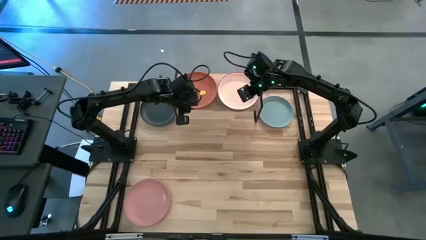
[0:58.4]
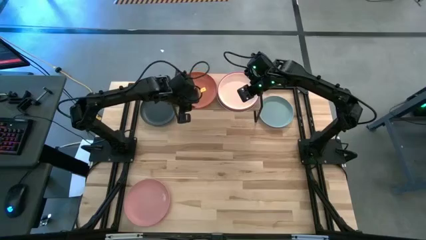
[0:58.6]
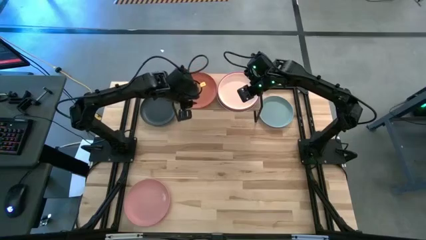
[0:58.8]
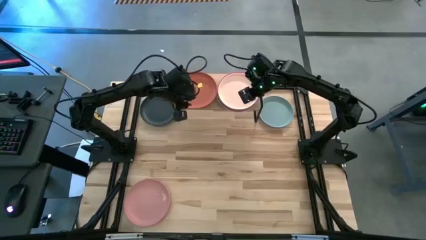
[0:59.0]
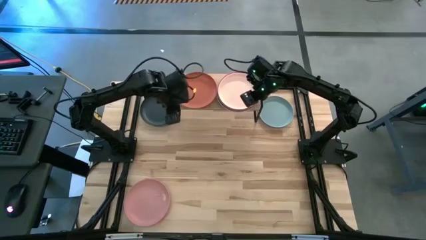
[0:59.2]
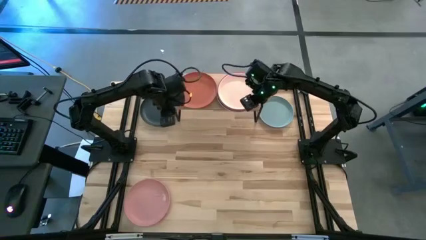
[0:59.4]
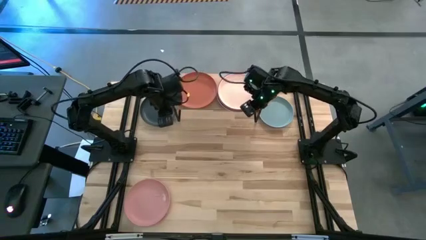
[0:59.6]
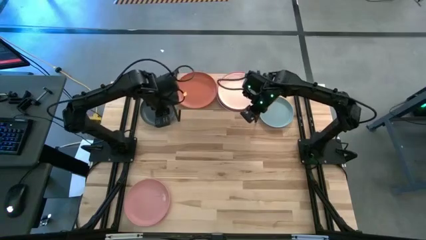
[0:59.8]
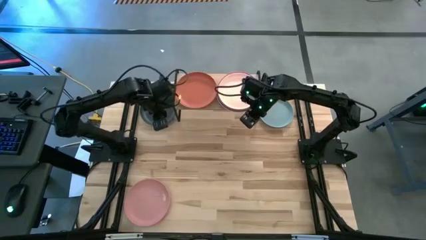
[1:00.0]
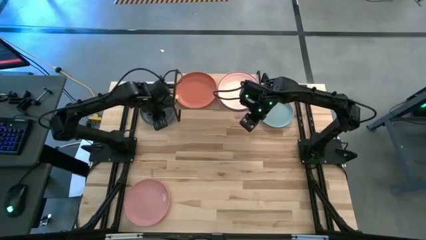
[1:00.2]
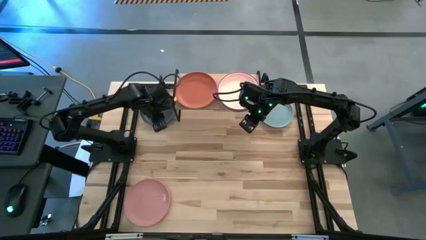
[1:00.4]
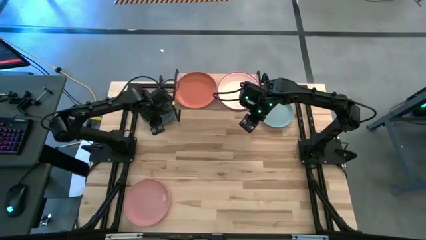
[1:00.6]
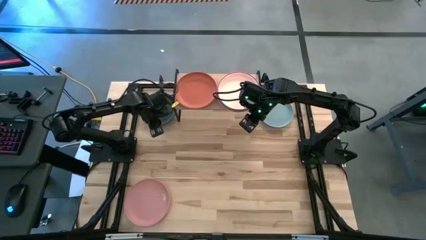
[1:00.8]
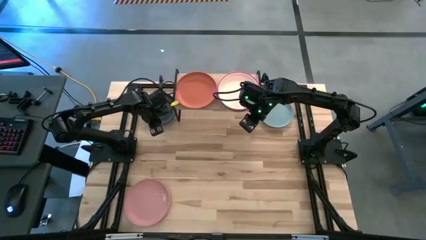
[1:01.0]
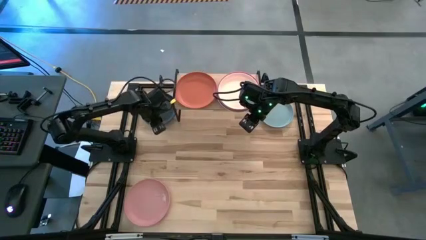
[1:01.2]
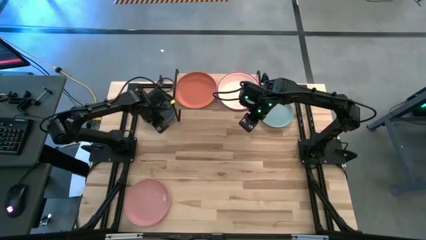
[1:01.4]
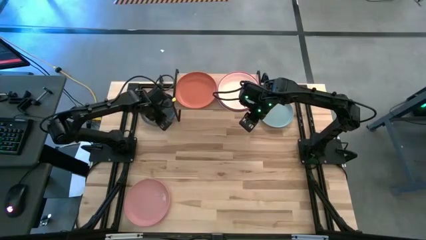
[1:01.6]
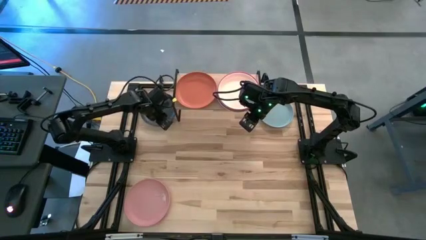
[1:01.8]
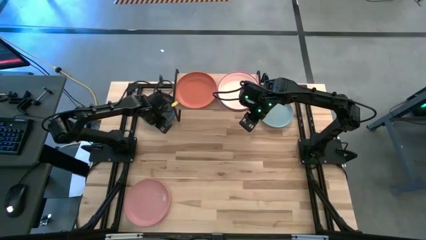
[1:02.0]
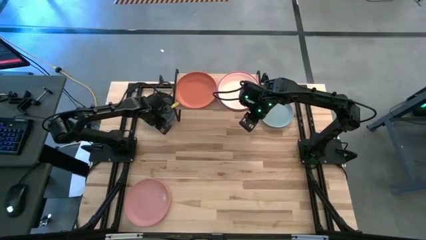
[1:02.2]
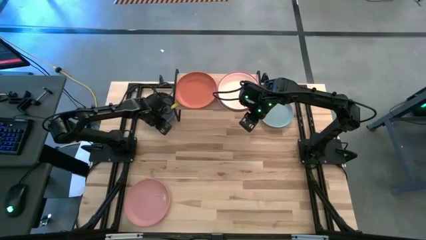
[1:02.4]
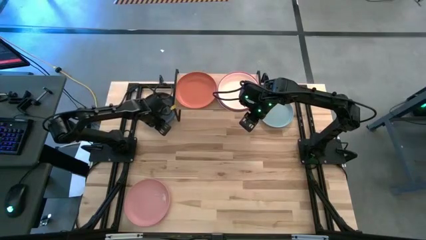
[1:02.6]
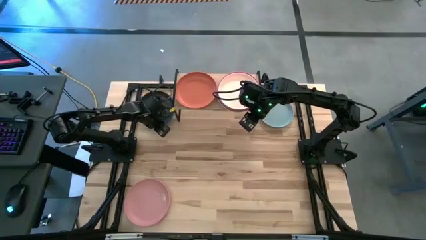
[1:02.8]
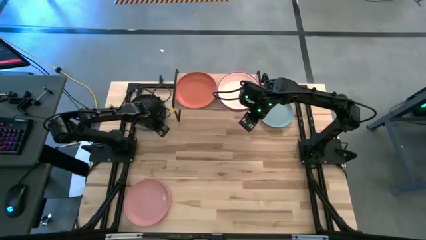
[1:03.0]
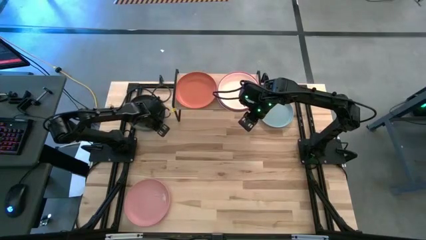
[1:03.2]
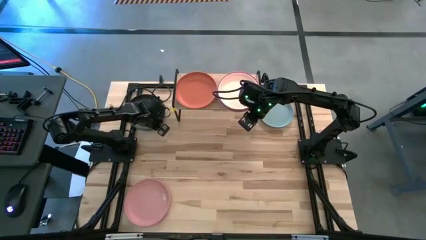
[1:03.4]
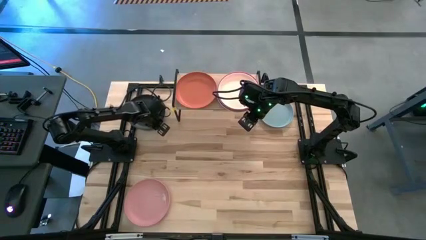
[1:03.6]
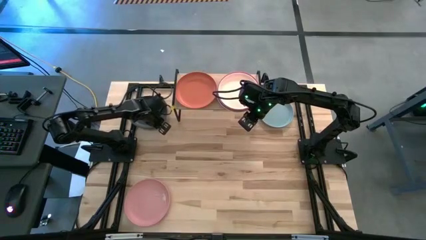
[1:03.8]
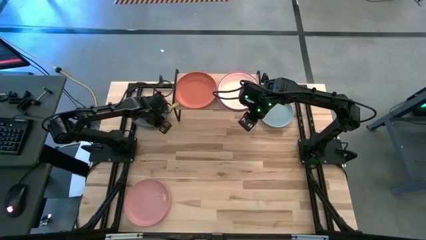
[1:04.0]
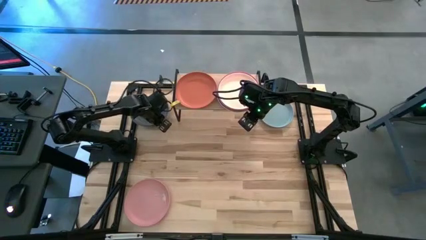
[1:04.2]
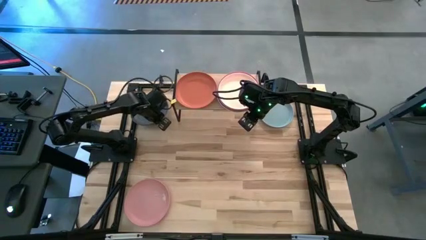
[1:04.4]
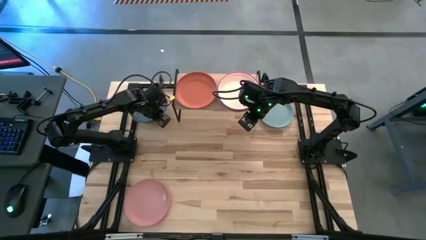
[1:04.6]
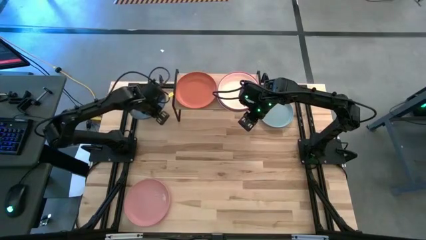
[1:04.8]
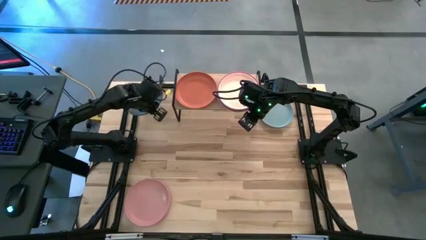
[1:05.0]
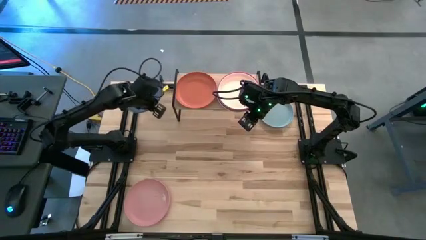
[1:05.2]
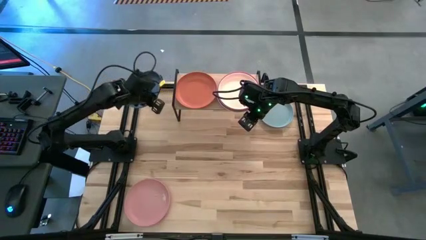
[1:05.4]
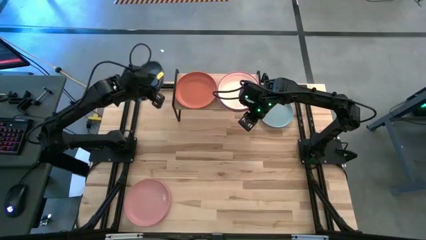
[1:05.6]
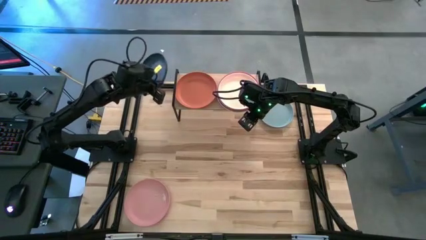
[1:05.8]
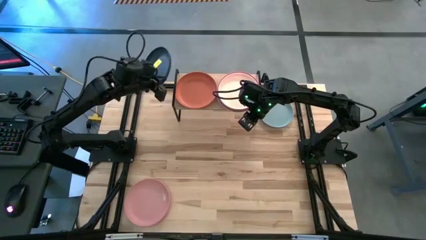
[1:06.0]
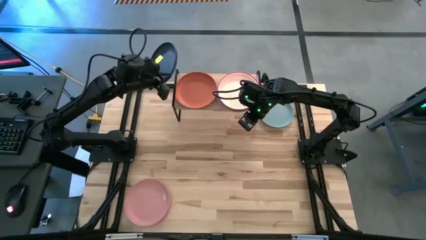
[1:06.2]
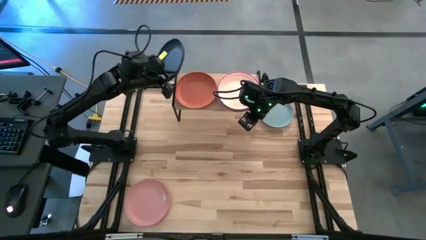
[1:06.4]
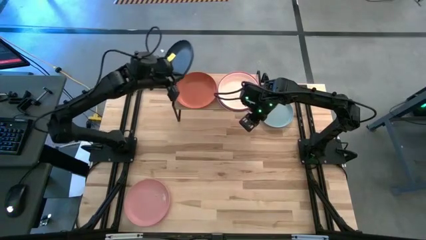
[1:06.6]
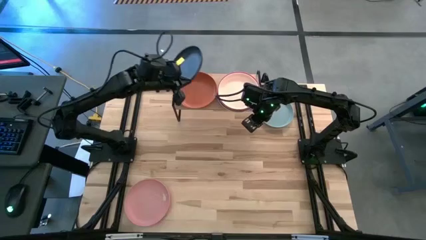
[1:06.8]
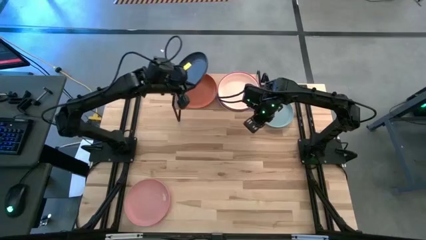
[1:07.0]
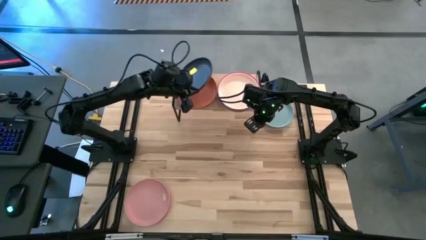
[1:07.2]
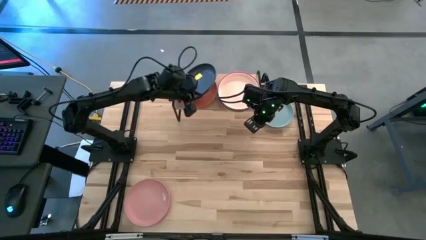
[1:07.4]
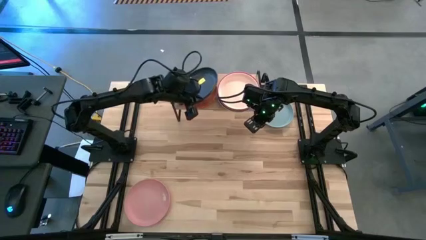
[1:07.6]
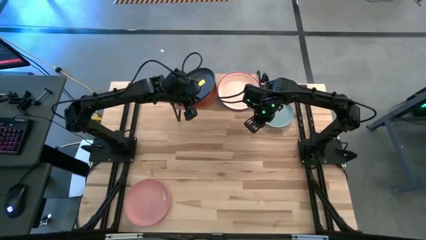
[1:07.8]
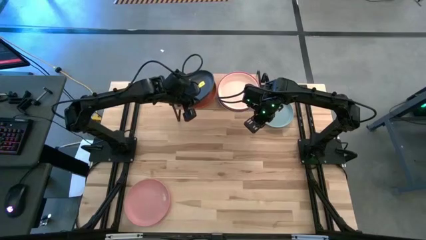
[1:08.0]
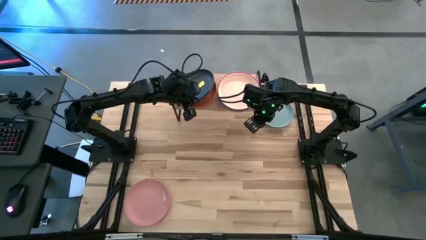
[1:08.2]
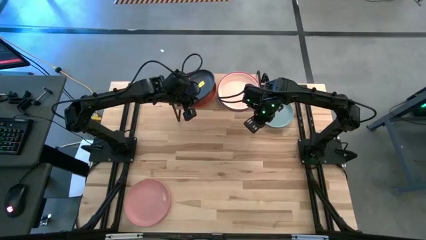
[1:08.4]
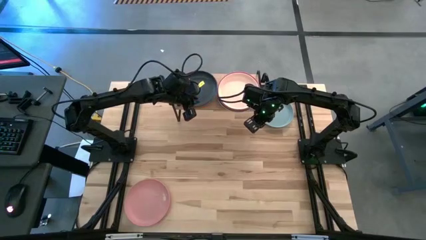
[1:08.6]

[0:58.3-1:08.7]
Task: Place and stack plates onto a shelf
Stack the black plate on top of the orange plate on the shelf

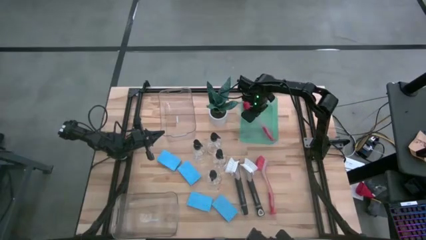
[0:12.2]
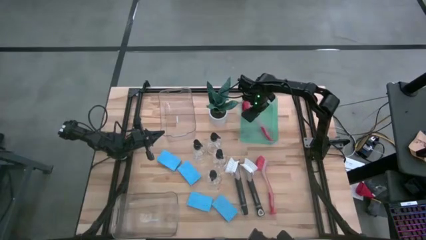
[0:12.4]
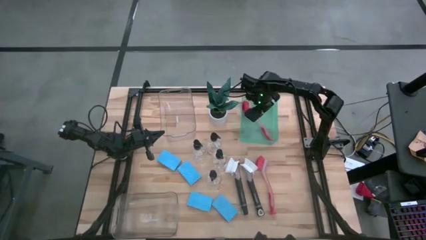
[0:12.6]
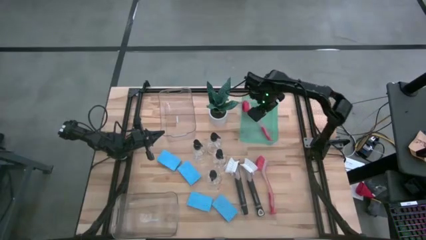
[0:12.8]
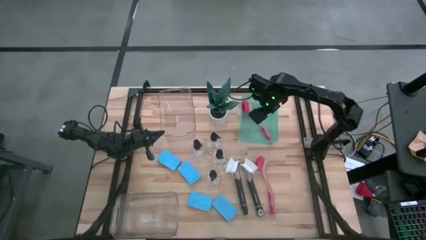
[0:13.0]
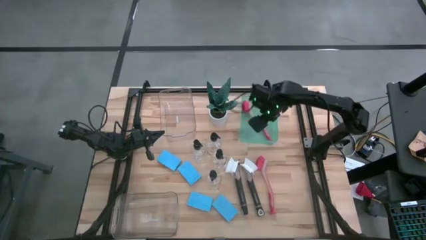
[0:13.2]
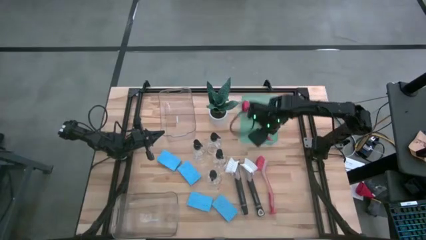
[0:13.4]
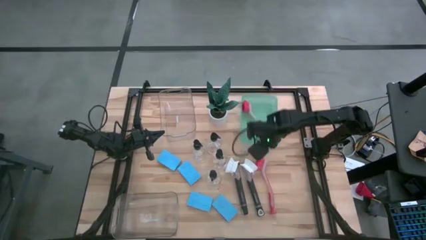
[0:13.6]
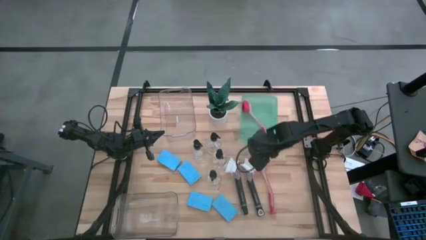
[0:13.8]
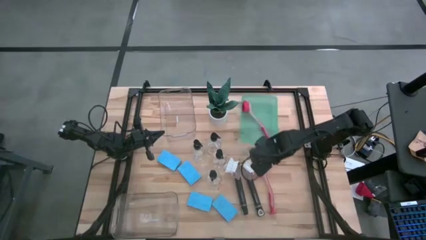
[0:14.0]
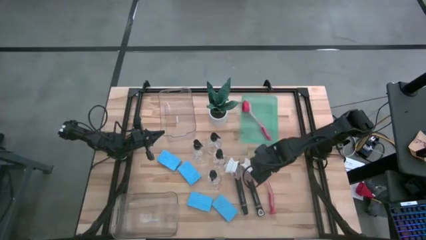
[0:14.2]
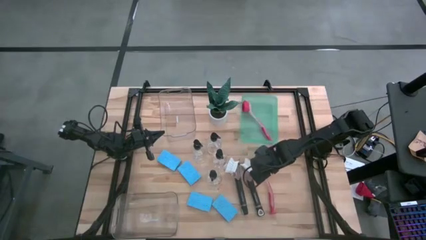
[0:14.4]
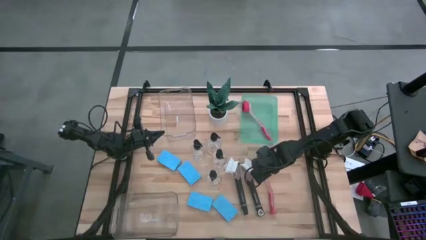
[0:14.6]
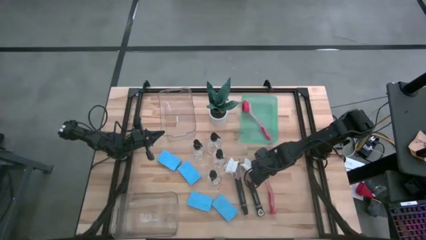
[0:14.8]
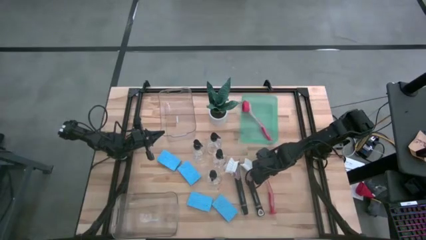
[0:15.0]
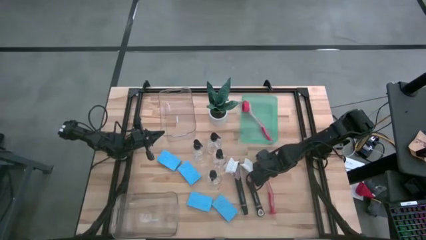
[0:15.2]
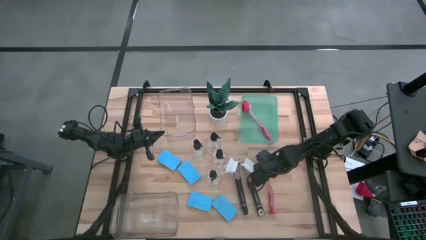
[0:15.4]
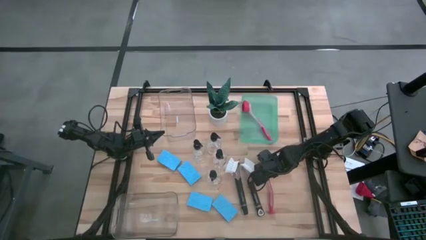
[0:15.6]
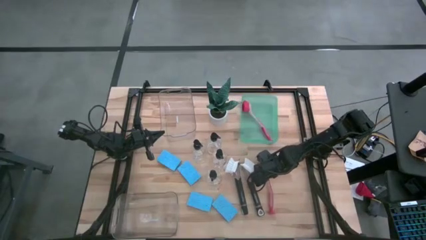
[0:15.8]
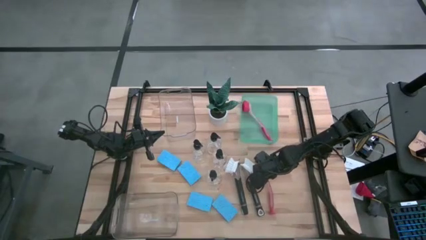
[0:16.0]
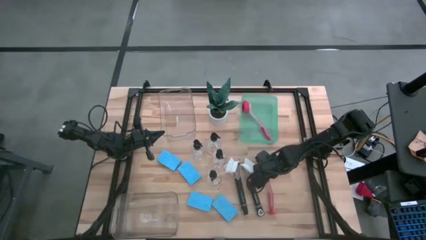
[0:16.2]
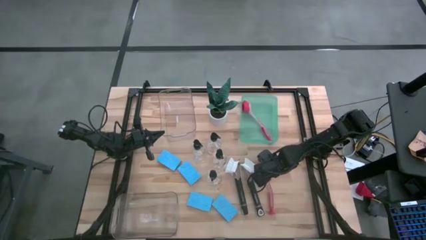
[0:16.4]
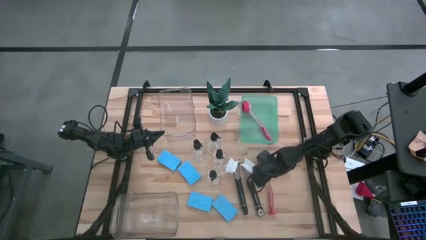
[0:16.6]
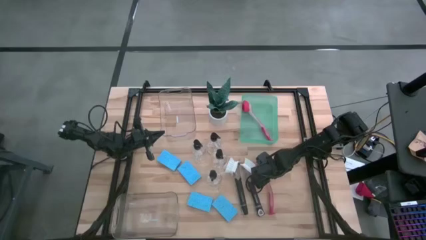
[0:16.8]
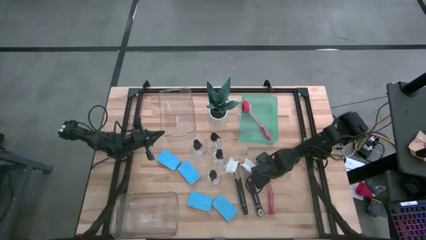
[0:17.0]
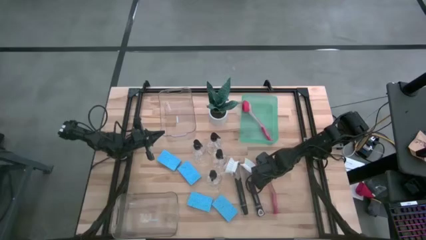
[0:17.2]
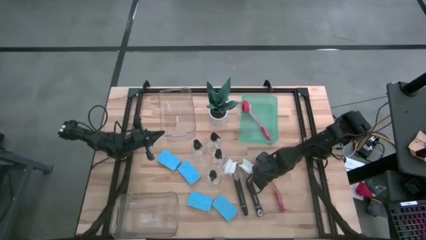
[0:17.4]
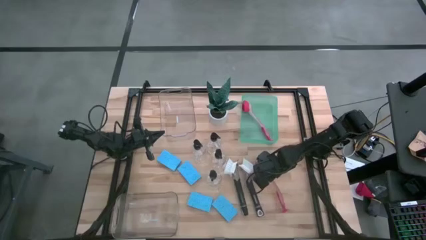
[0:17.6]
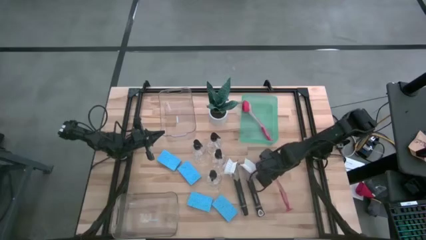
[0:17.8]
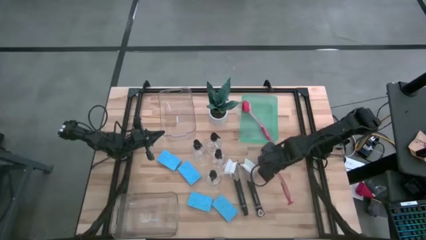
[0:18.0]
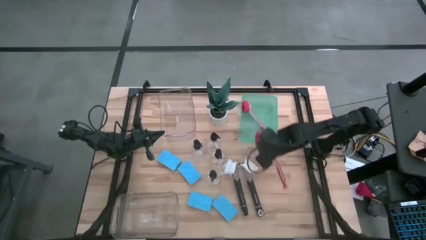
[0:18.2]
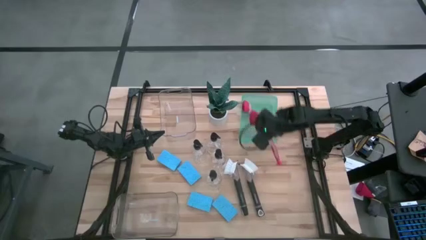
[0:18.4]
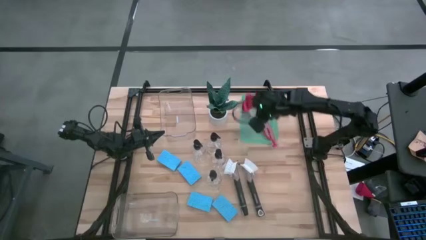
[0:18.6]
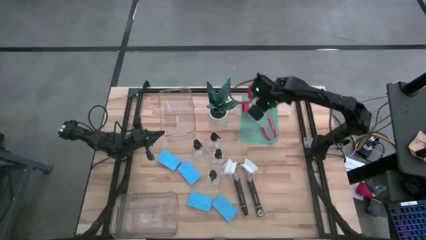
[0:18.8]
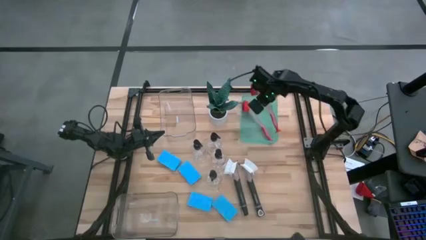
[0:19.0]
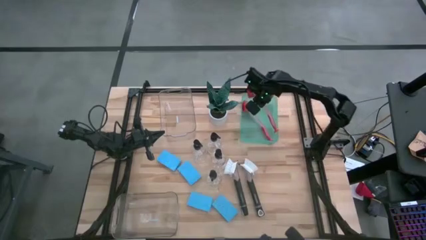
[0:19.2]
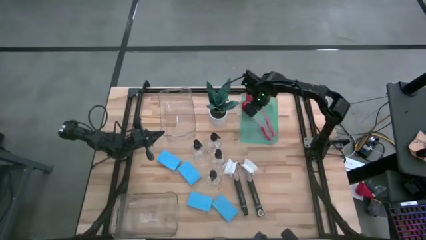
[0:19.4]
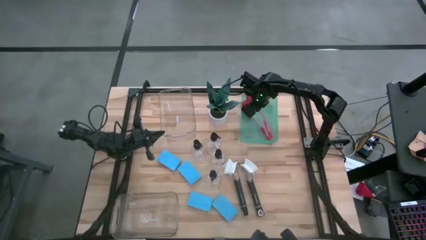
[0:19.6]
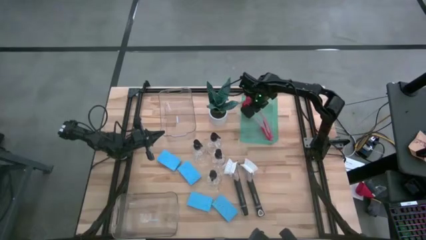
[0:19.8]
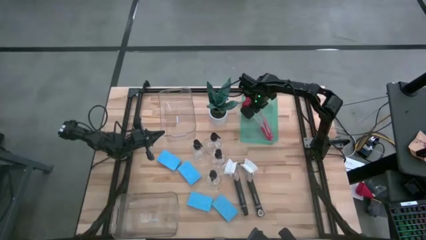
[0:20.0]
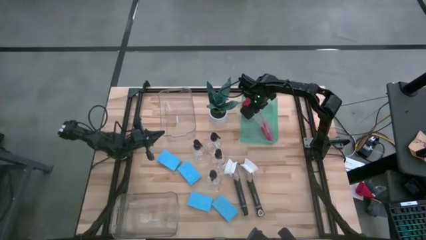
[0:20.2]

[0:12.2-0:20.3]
Task: Pick & Place Kitchen Sink Supplies
Put the red dish brush into the green bin
